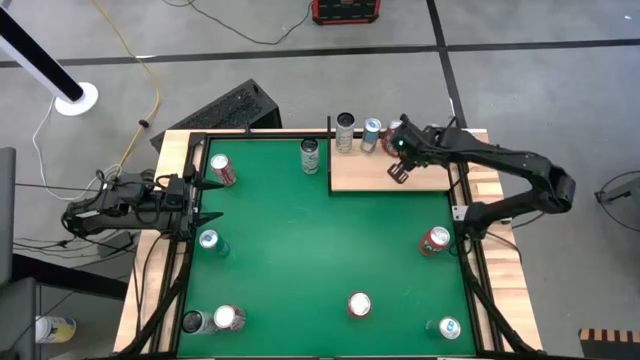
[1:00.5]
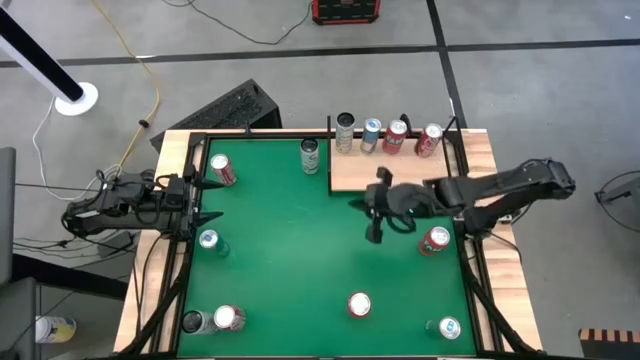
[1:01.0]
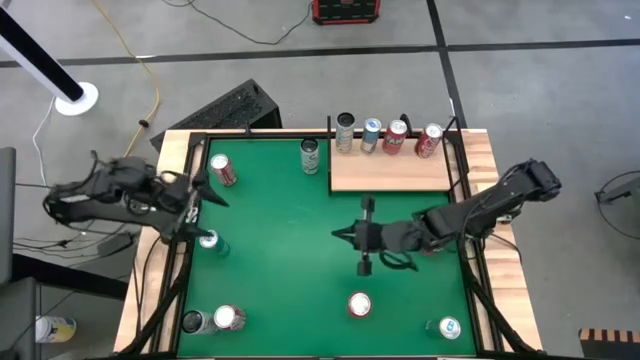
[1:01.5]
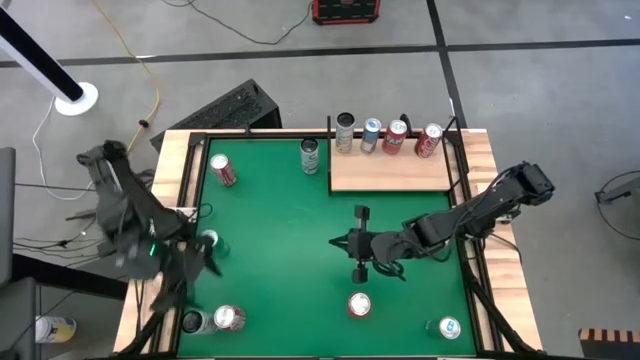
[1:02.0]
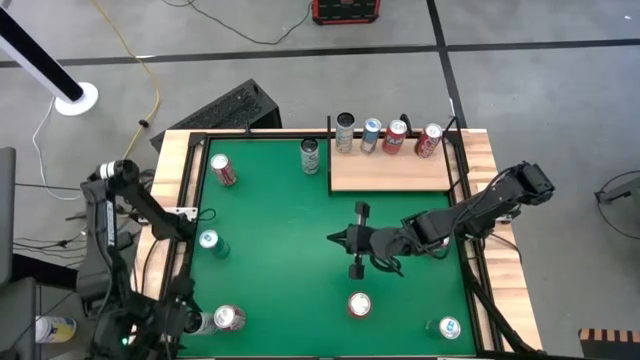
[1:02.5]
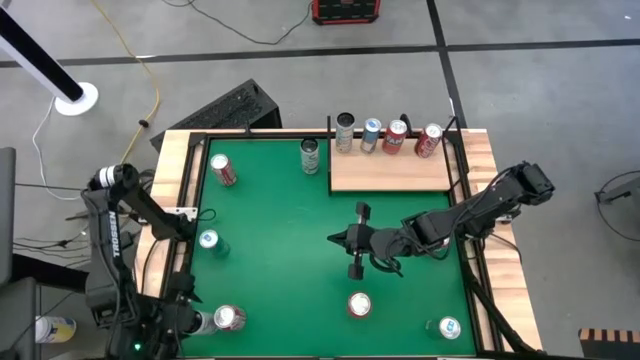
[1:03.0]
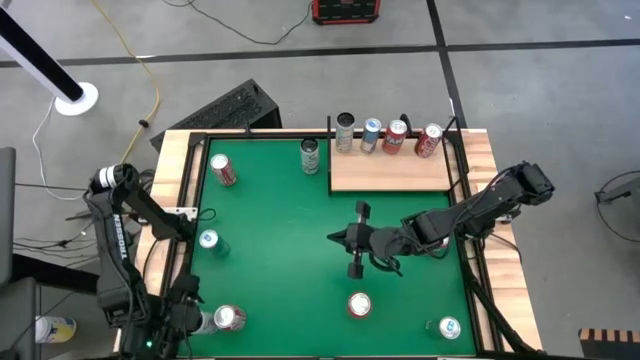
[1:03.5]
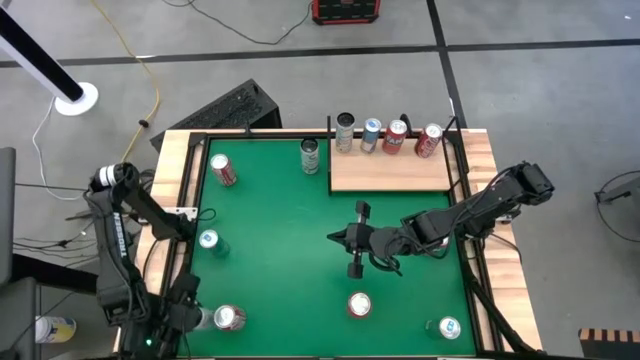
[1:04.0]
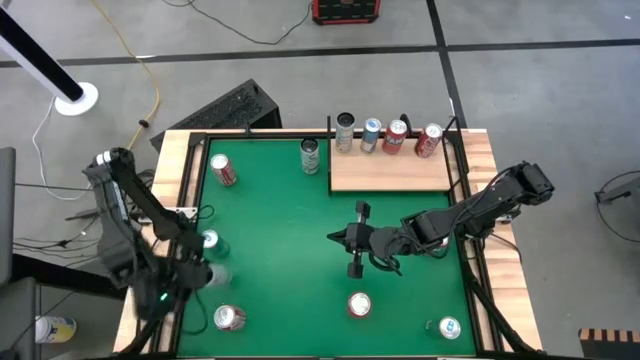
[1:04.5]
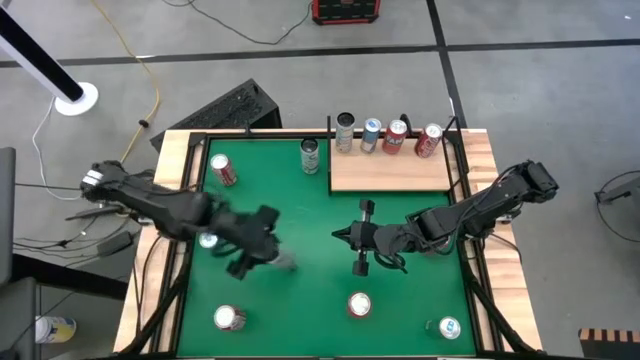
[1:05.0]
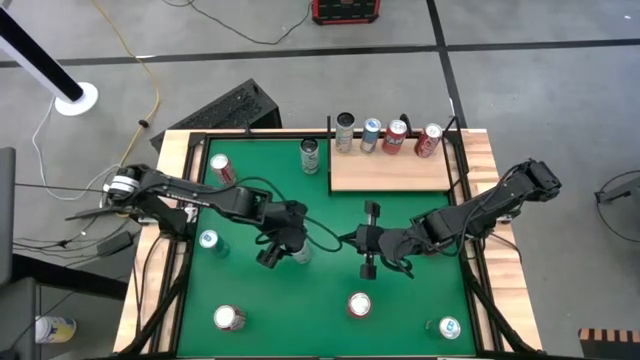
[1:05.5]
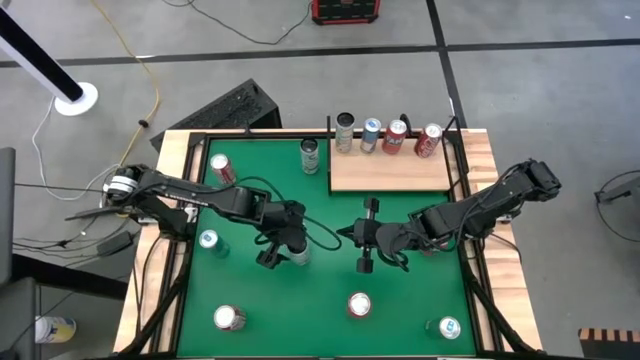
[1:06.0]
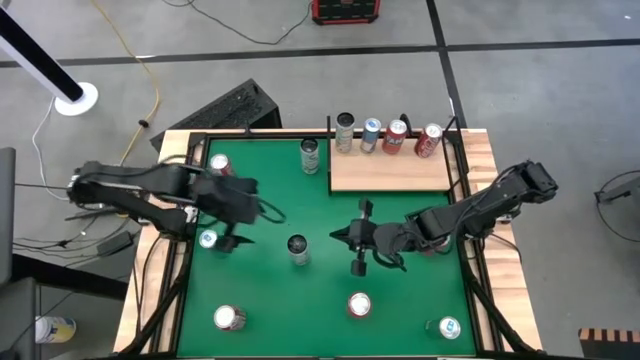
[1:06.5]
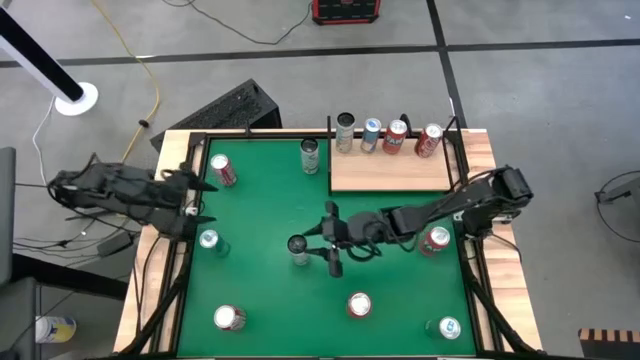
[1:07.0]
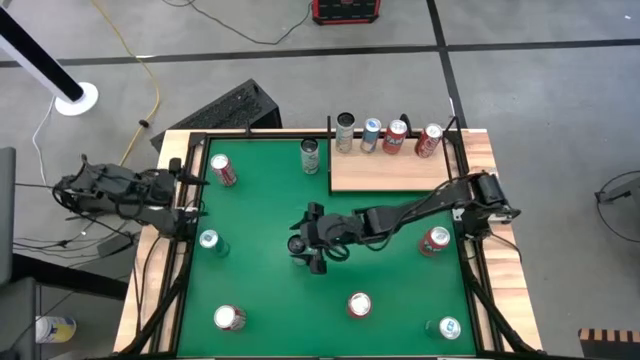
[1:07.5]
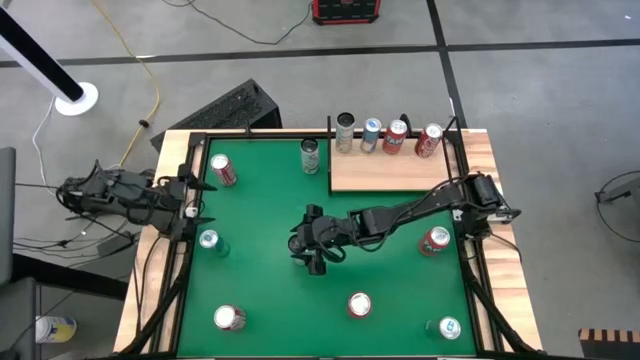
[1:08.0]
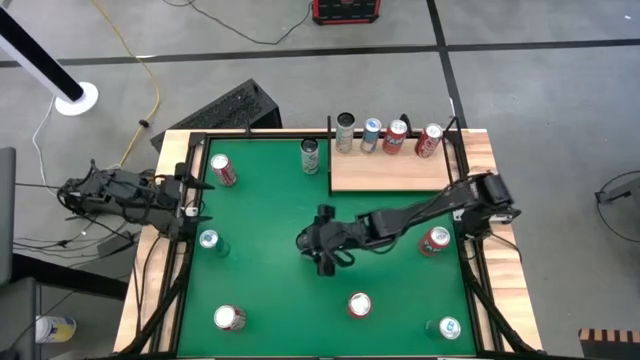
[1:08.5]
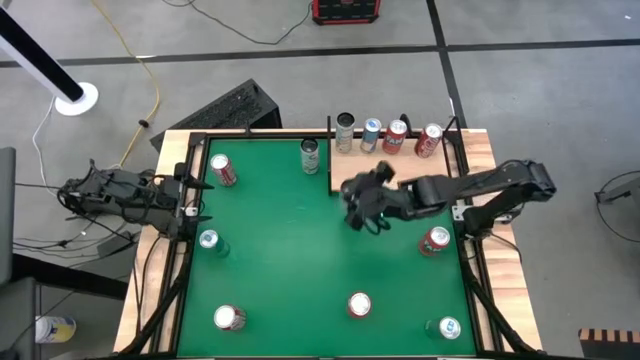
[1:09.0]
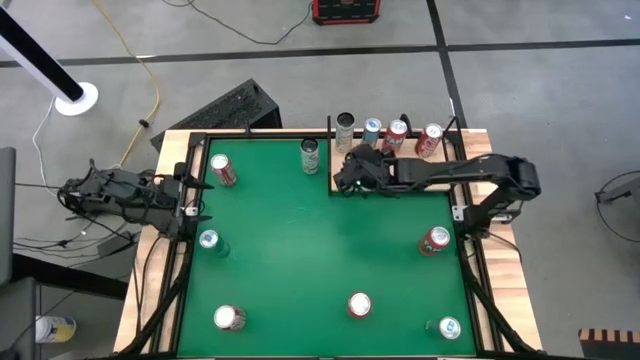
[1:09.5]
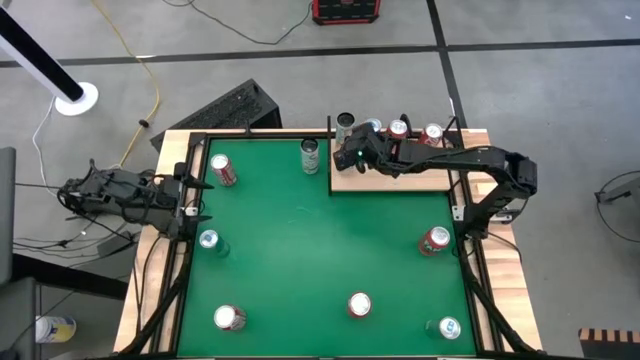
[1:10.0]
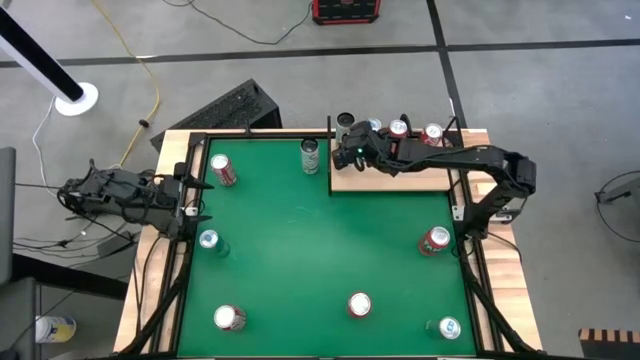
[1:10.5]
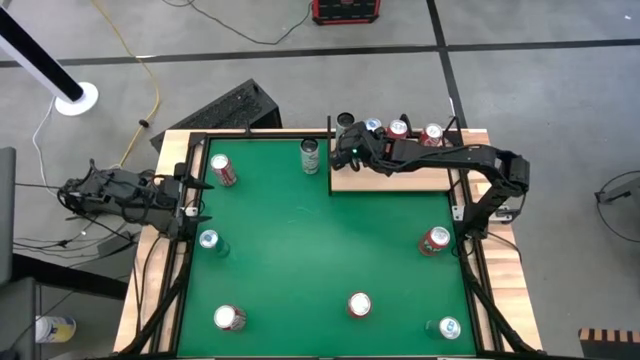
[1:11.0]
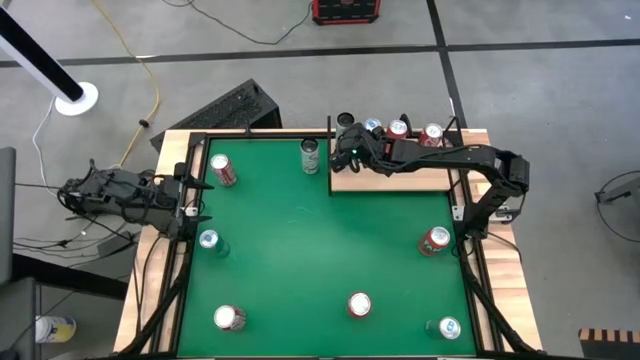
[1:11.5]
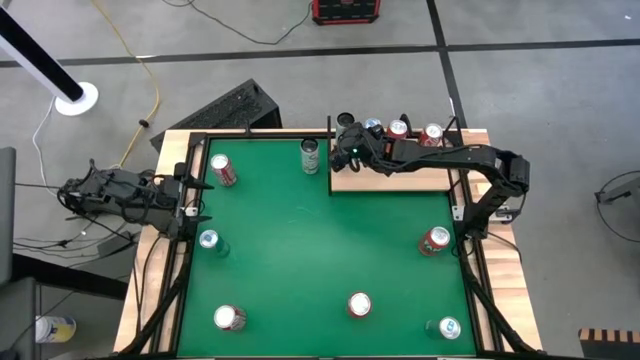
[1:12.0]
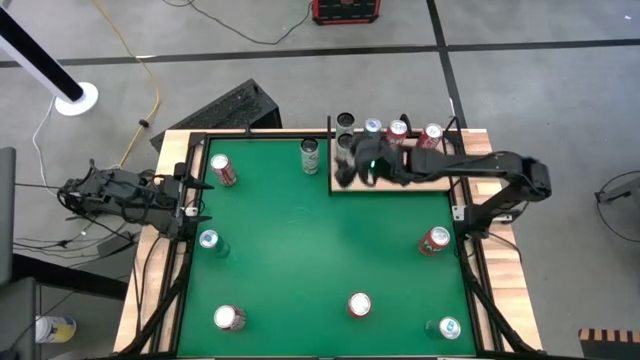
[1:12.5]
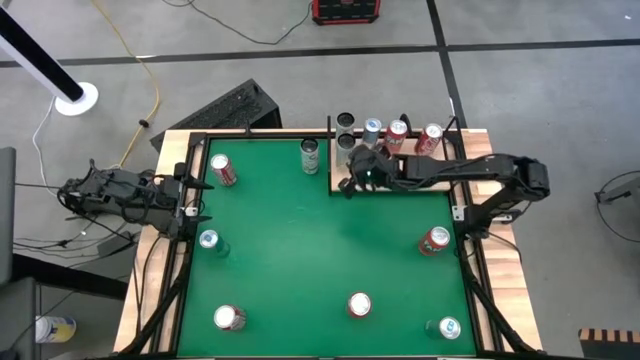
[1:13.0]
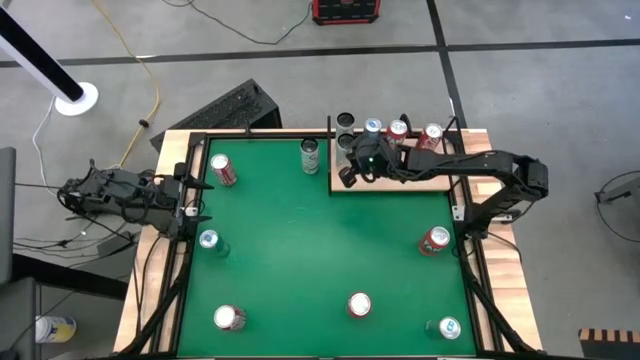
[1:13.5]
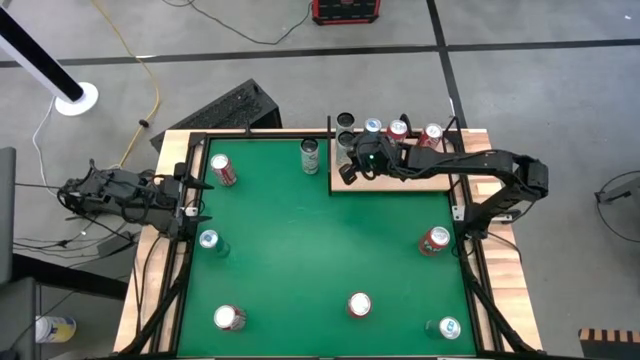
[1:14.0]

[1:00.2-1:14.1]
Task: Sort soda cans
Put the bottom white and blue soda can on the shelf align with the other white and blue soda can

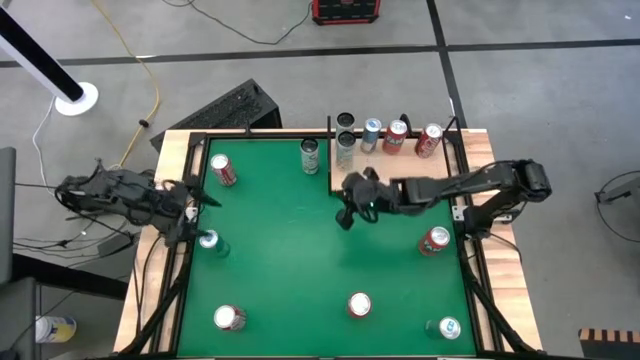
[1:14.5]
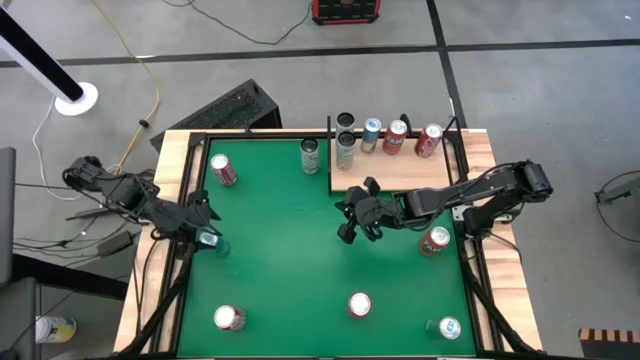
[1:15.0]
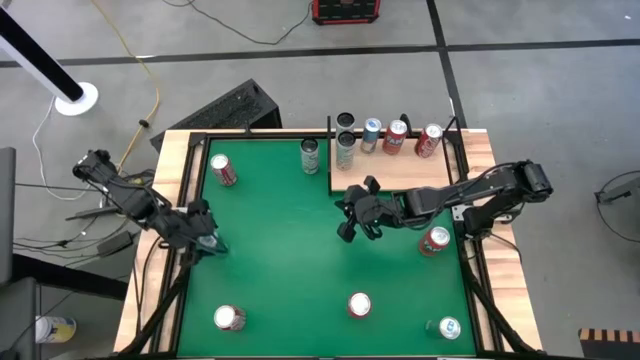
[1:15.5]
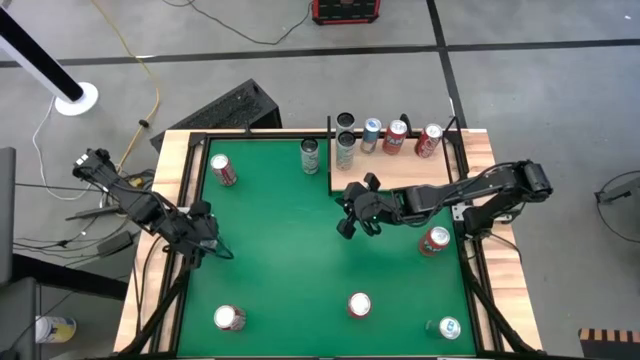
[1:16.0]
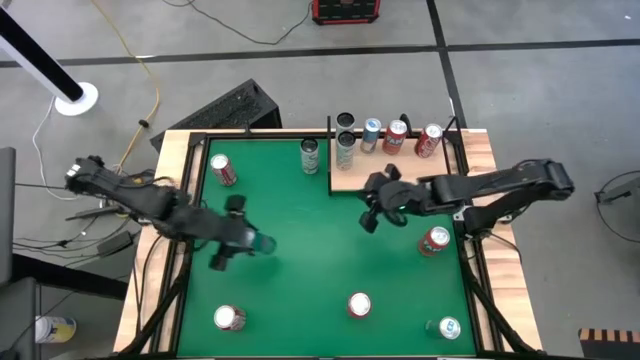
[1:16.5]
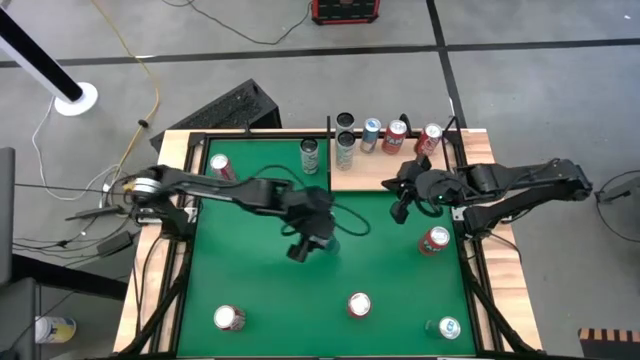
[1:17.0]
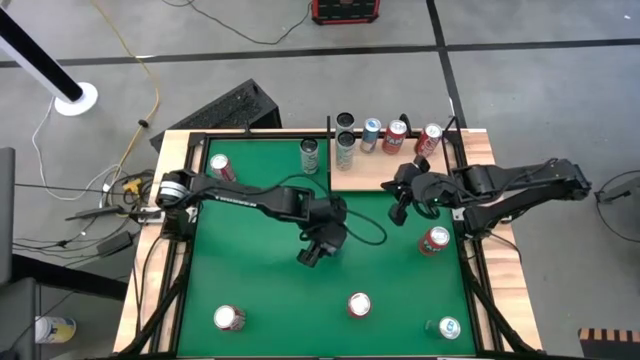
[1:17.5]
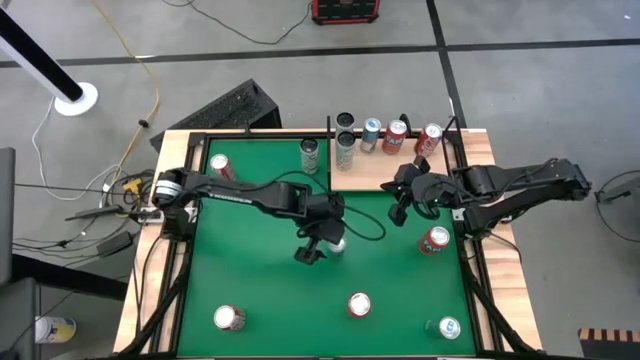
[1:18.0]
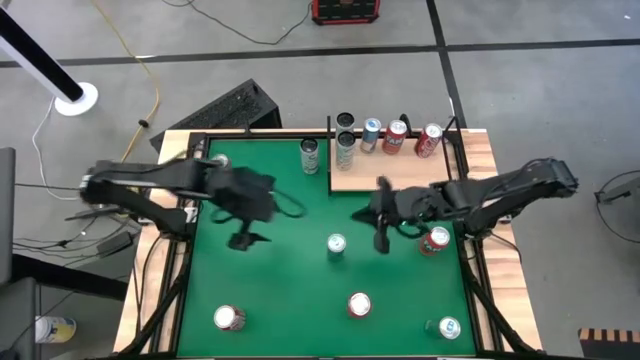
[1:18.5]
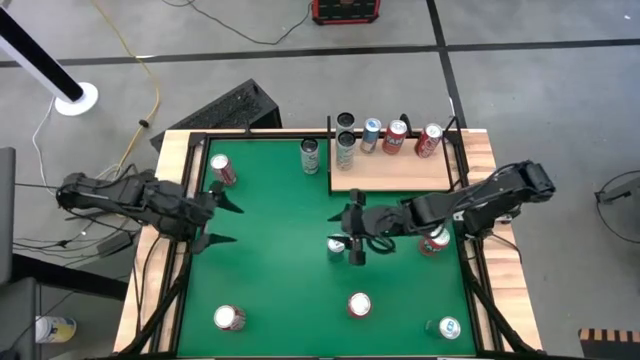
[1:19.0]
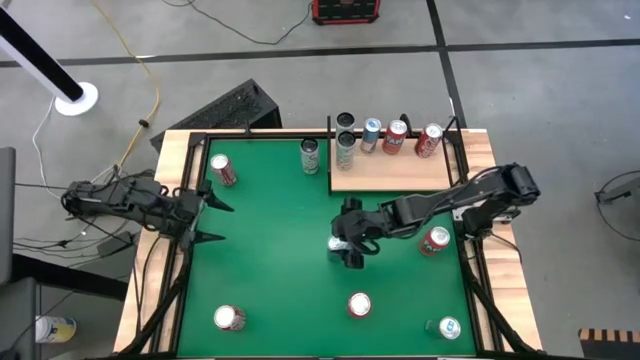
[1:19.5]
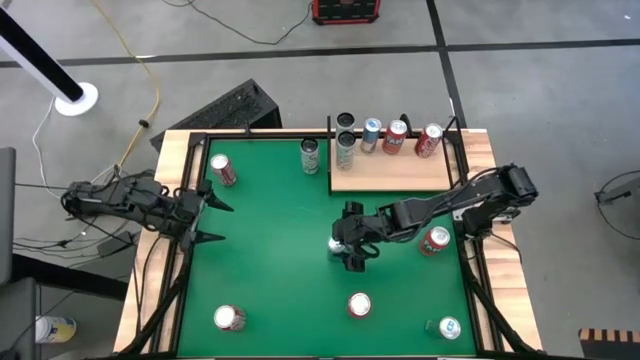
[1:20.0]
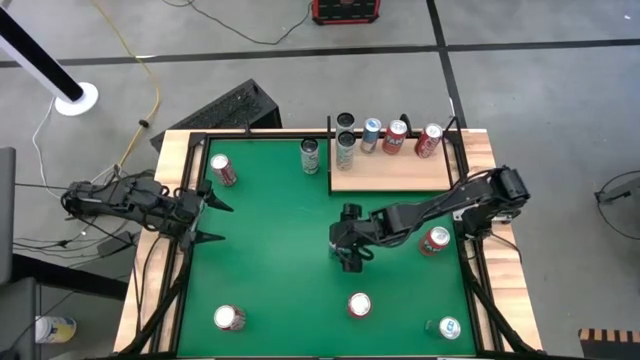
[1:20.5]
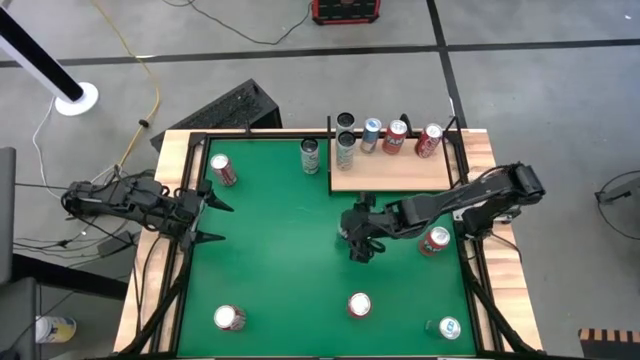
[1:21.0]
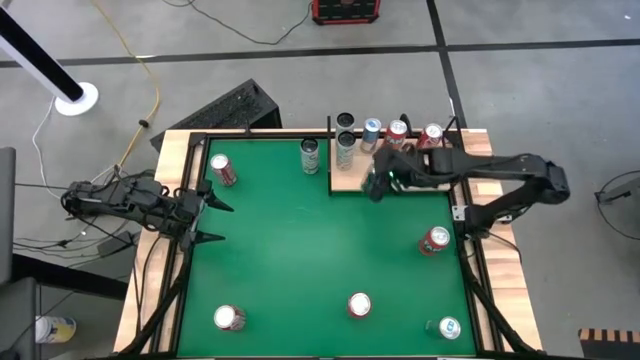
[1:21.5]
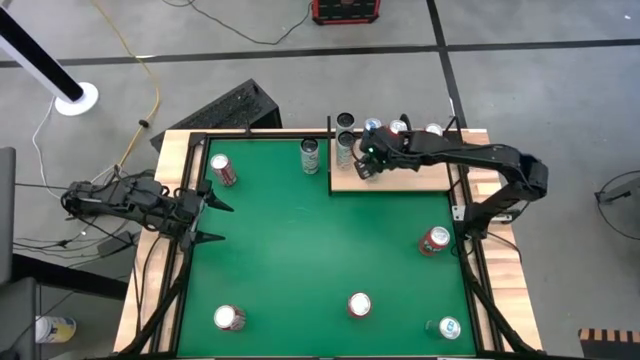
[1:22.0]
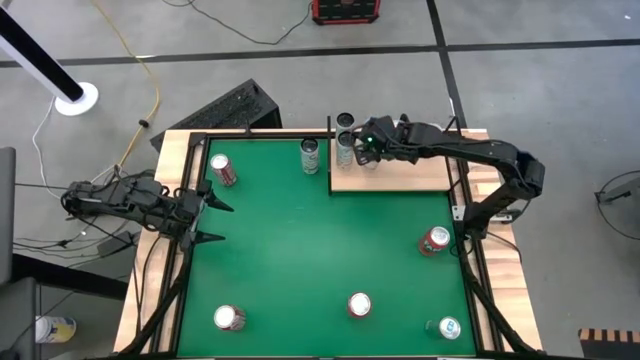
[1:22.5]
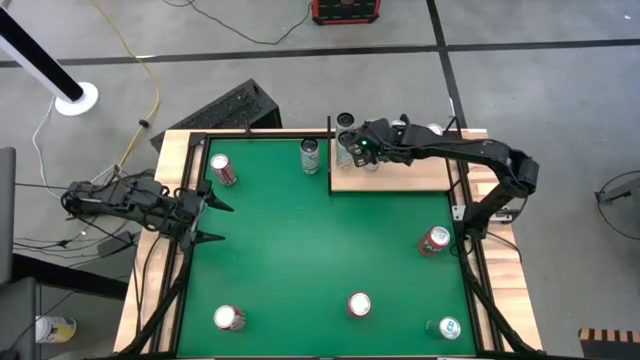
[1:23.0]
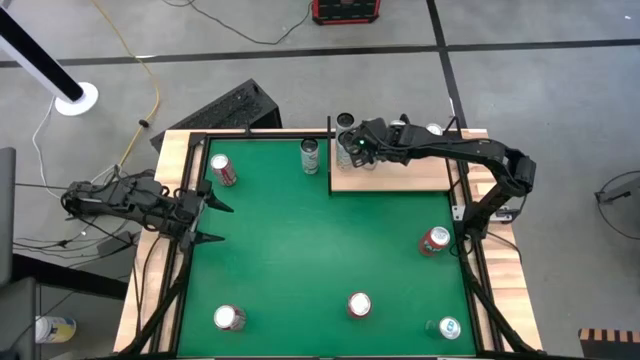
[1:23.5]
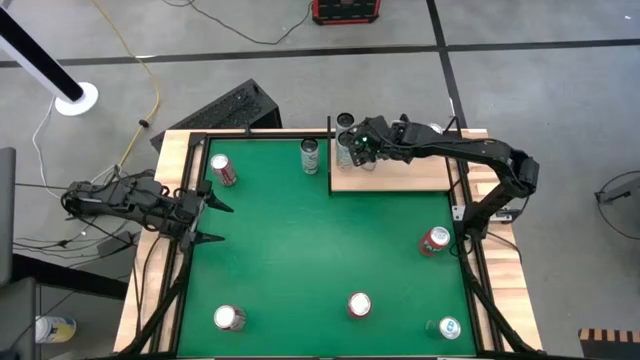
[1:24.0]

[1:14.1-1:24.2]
Put the top blue soda can on the shelf align with the other blue soda can
